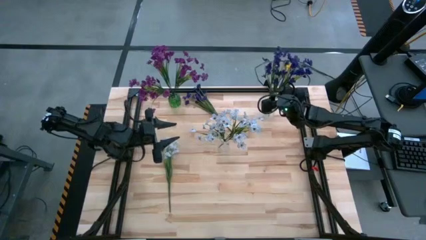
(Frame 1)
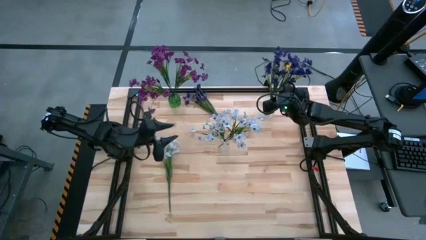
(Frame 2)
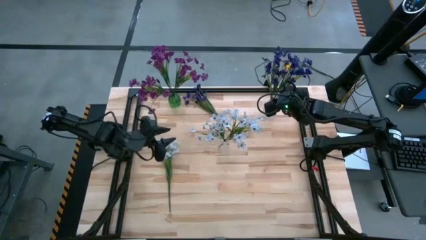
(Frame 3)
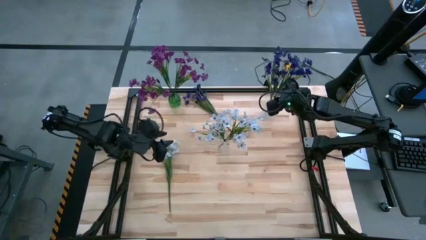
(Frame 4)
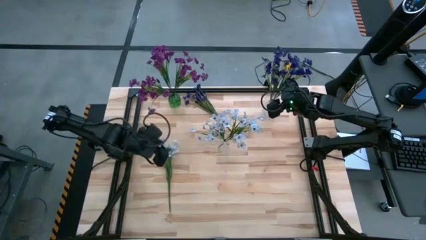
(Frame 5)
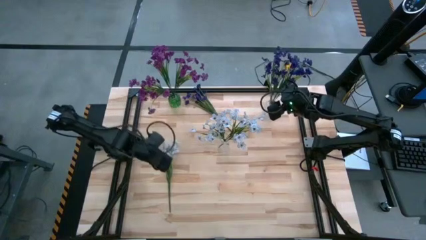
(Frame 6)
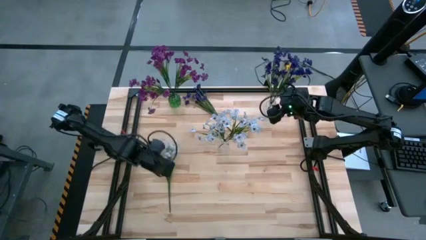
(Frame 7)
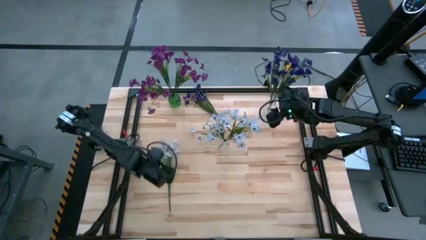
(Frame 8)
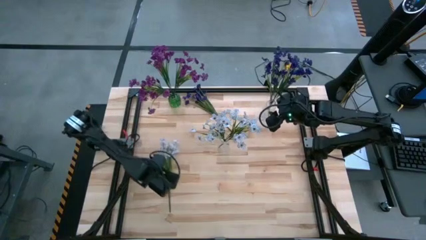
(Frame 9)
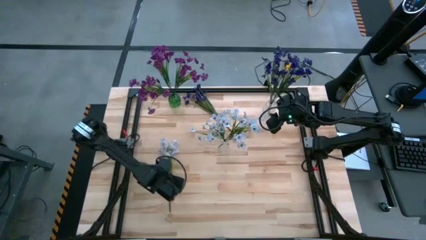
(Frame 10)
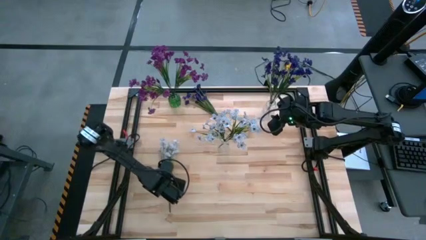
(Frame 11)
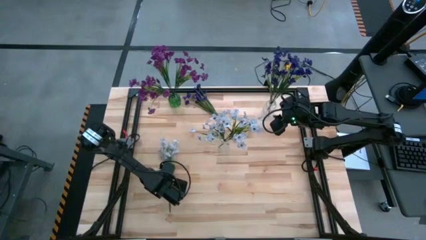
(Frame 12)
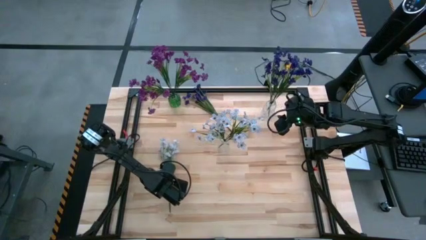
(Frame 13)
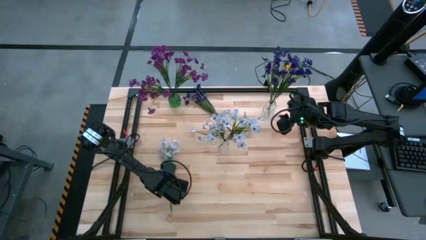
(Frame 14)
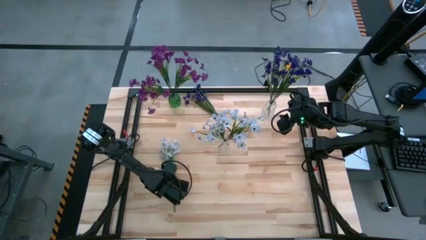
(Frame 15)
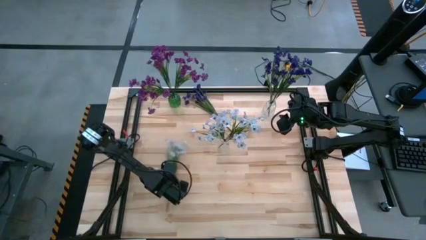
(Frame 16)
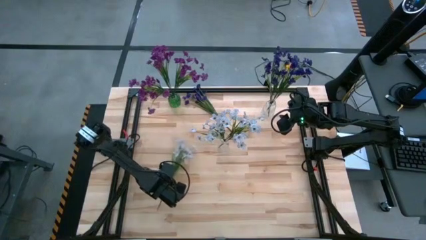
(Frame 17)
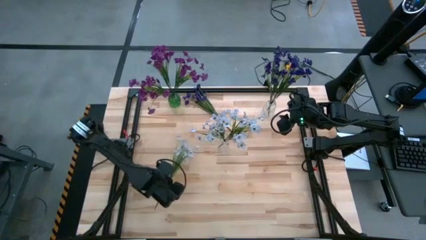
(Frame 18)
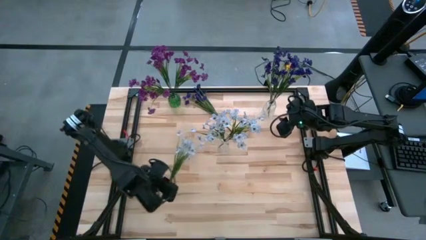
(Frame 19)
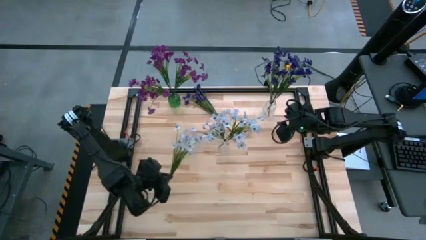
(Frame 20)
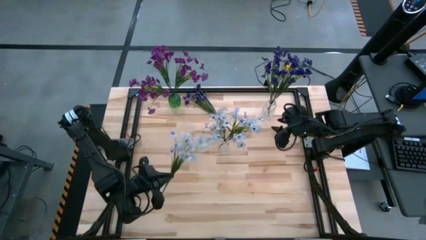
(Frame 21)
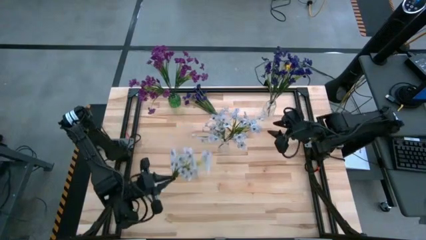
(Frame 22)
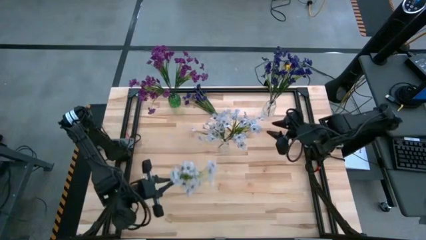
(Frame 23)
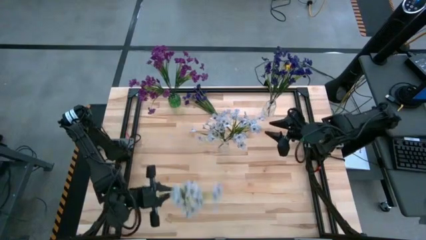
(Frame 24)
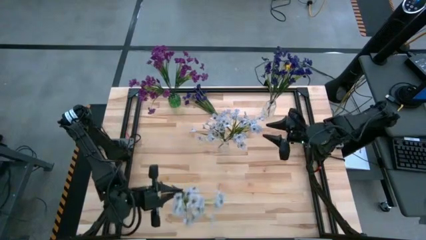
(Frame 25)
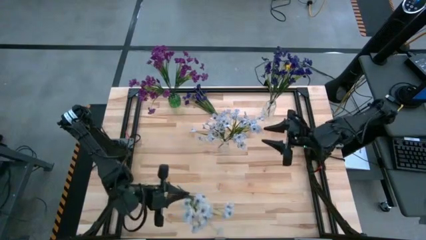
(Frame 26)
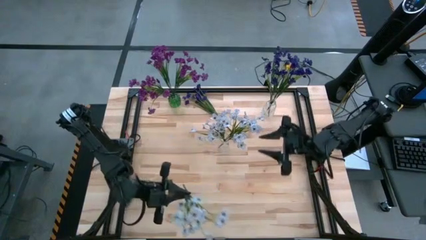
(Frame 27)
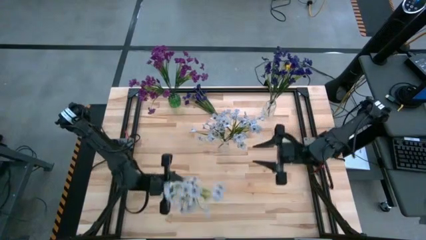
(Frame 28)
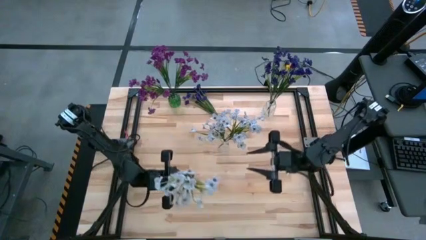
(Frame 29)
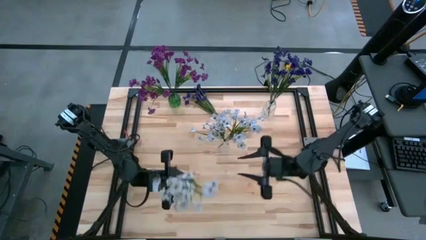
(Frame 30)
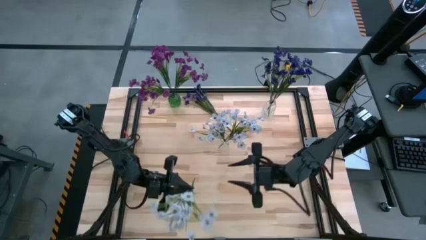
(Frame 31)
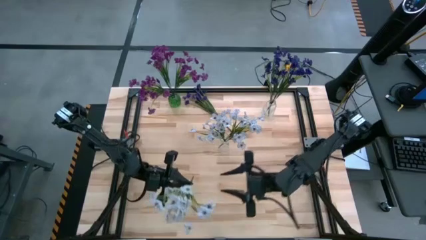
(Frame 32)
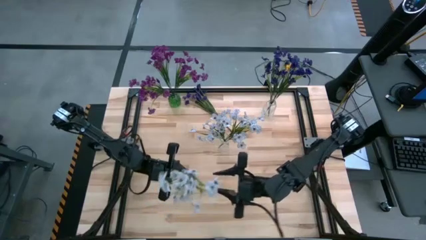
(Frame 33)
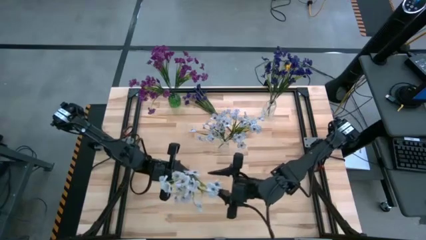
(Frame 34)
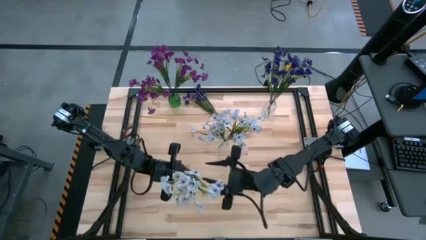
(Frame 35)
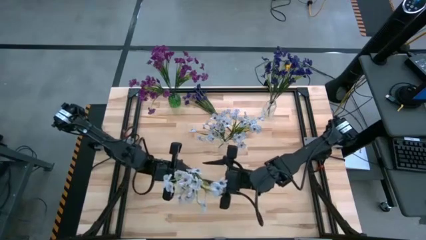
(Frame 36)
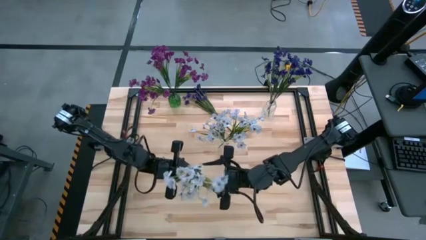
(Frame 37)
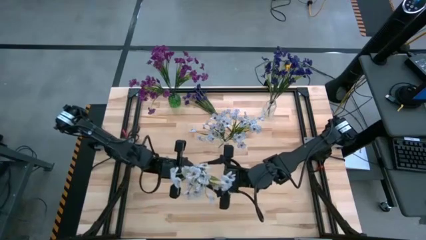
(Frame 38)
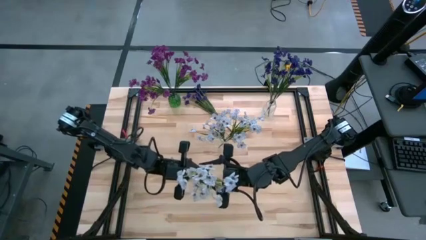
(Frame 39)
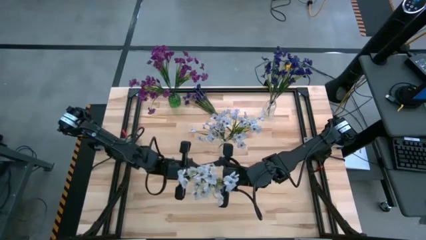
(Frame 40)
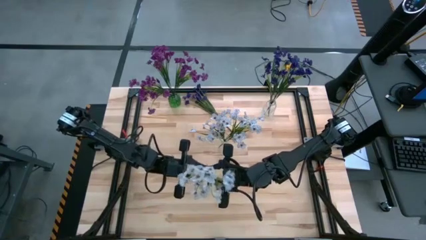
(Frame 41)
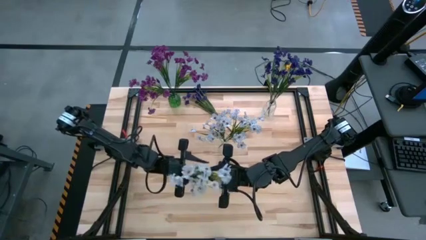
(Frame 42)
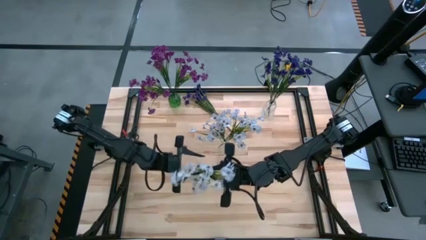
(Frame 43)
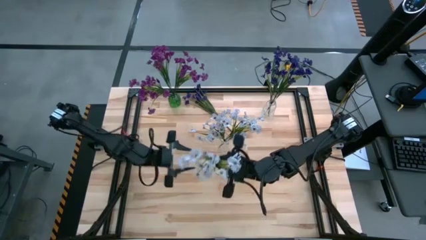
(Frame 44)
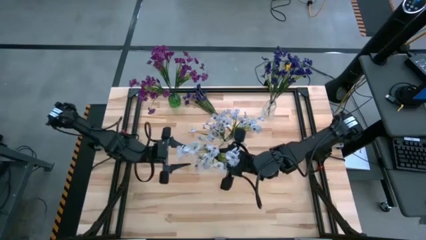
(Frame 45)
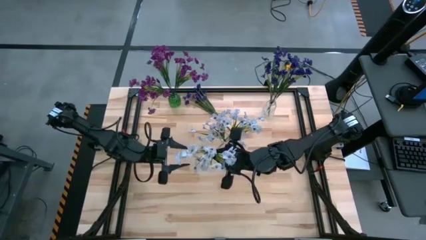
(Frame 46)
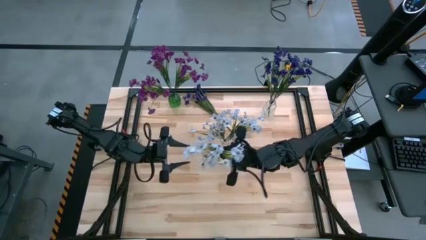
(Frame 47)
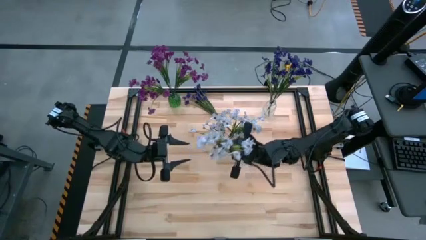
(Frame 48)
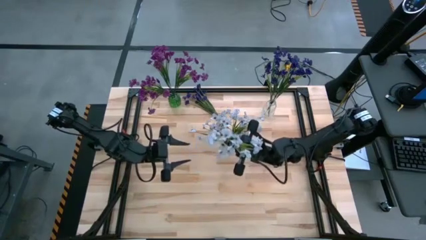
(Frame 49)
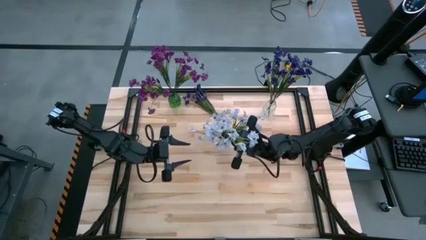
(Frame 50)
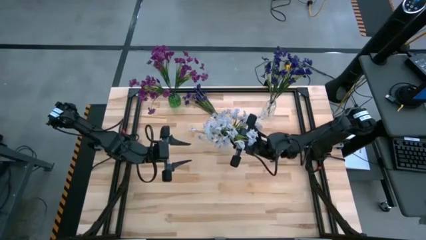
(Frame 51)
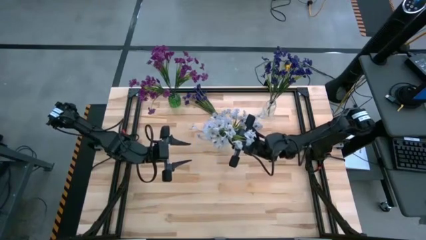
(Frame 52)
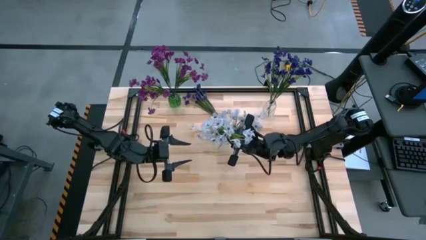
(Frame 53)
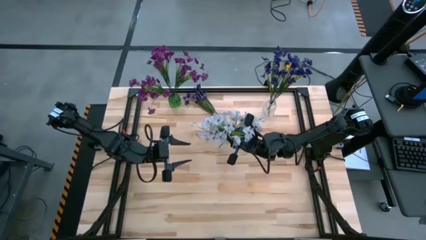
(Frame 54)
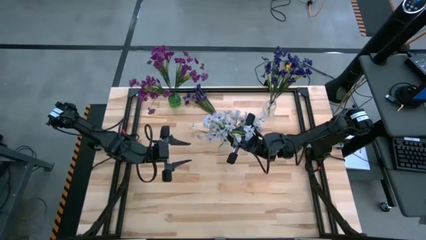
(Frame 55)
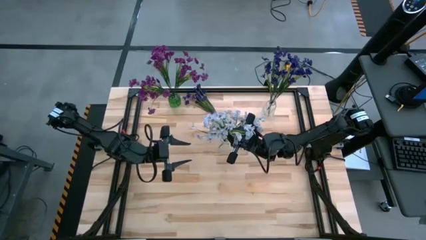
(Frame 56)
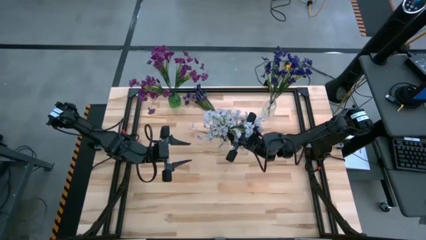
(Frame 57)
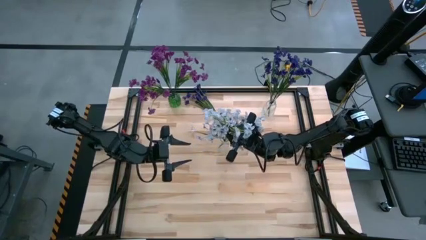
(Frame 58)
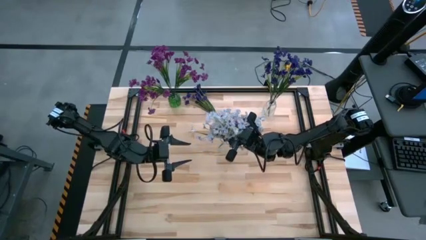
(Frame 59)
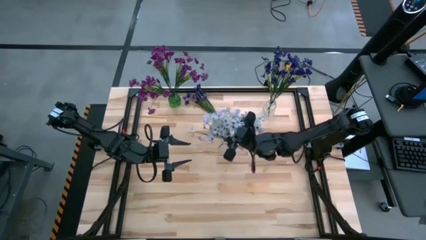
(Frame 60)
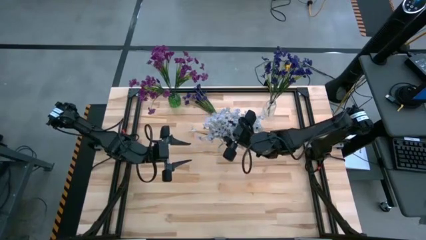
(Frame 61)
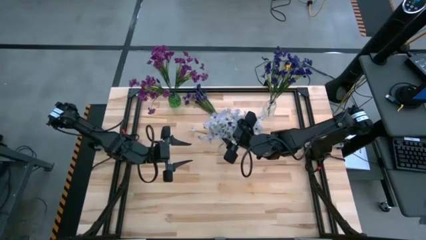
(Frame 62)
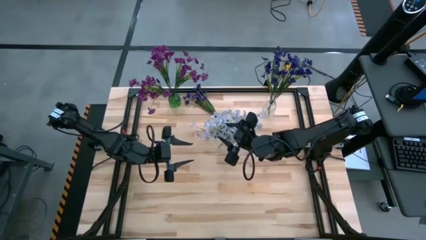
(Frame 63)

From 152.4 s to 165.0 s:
Task: Sort flowers into vase by color
Put the white flowers into the bottom transparent flower vase
